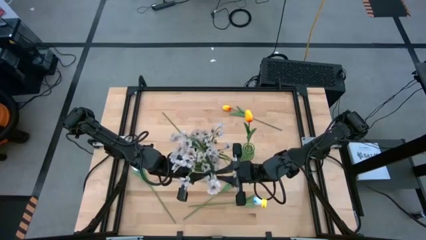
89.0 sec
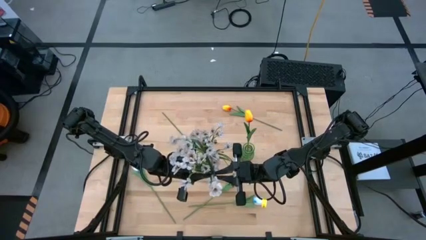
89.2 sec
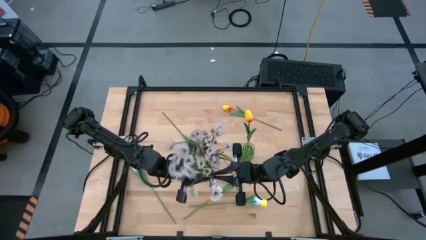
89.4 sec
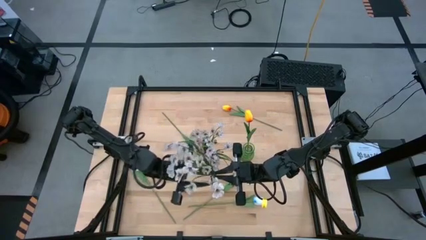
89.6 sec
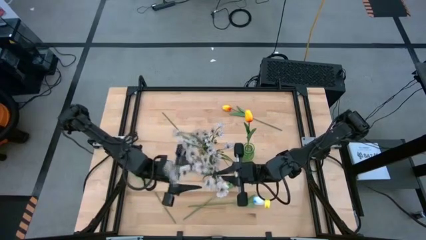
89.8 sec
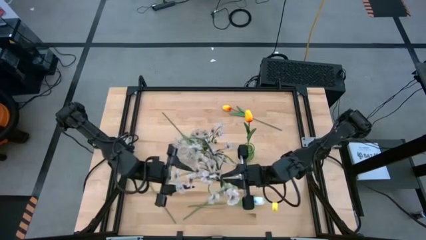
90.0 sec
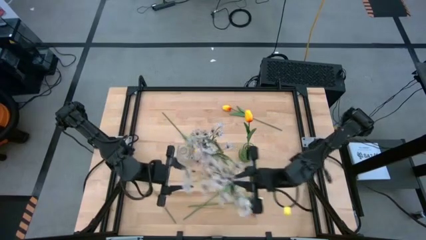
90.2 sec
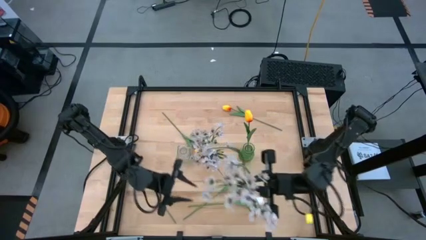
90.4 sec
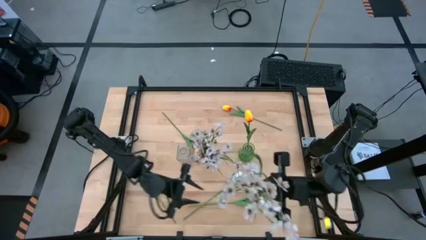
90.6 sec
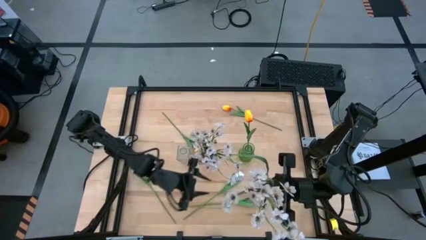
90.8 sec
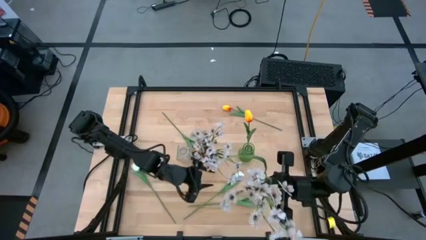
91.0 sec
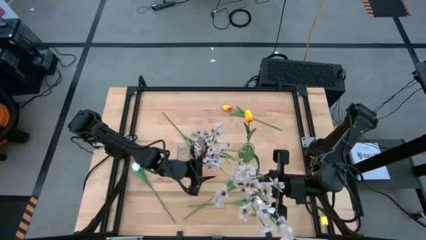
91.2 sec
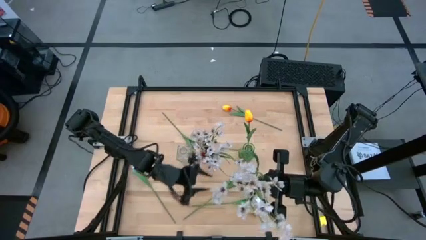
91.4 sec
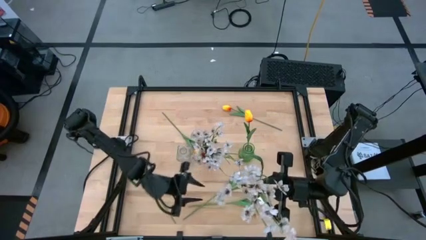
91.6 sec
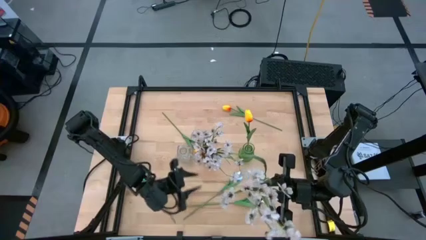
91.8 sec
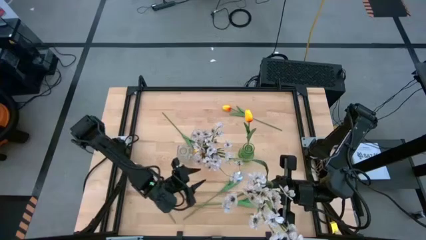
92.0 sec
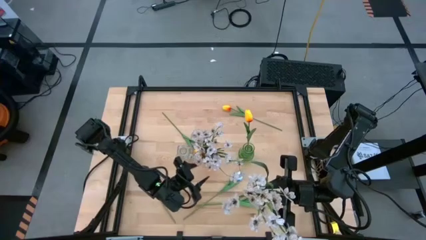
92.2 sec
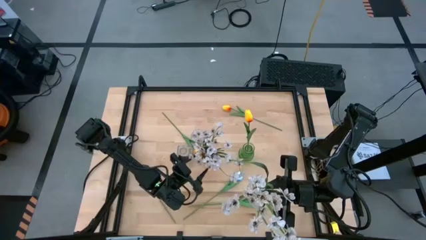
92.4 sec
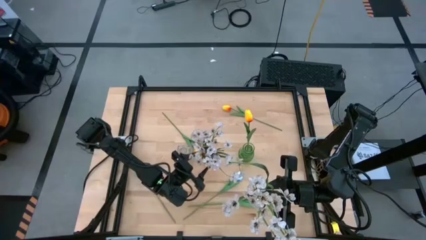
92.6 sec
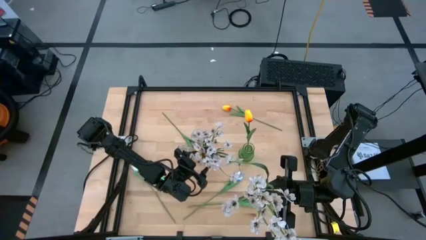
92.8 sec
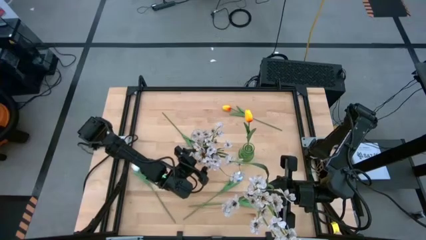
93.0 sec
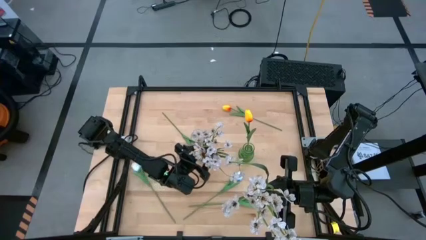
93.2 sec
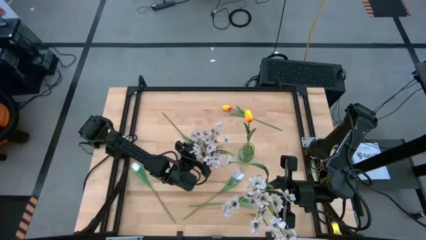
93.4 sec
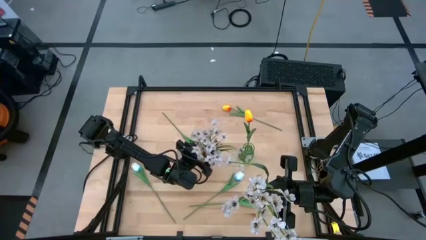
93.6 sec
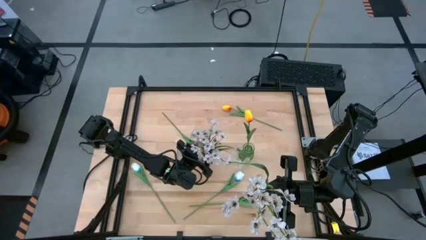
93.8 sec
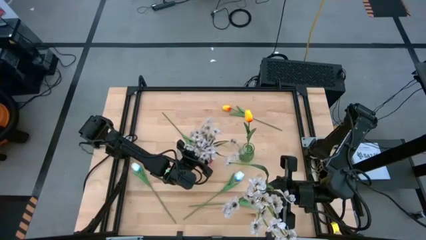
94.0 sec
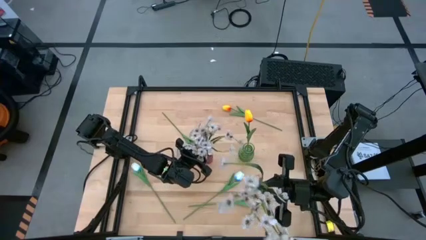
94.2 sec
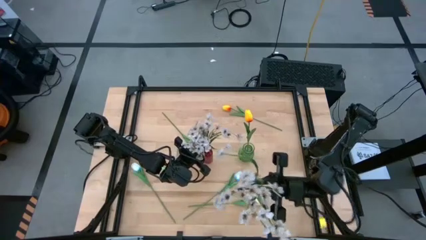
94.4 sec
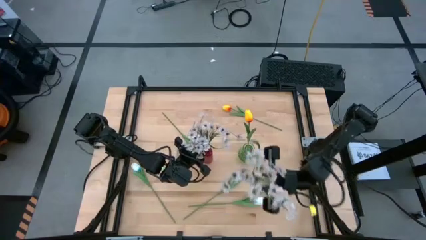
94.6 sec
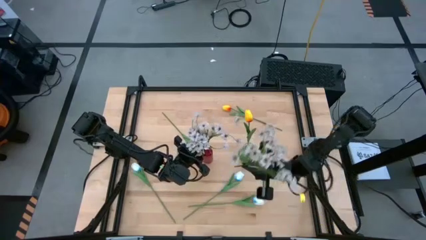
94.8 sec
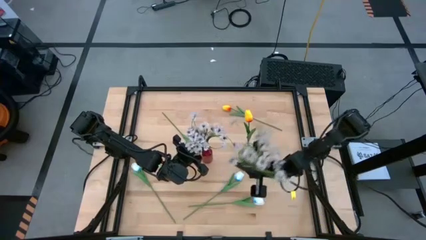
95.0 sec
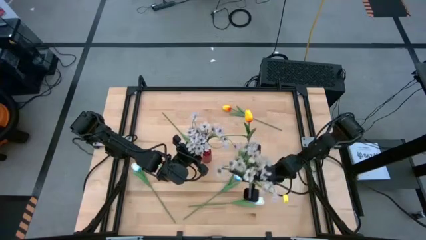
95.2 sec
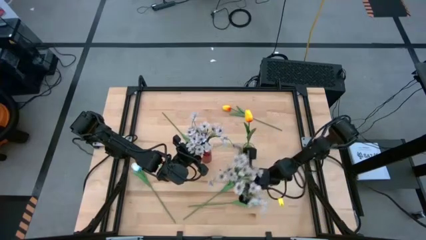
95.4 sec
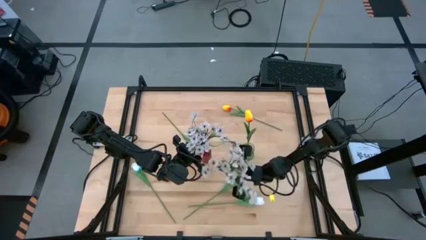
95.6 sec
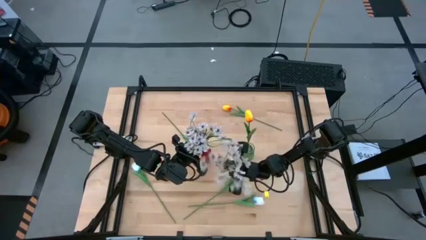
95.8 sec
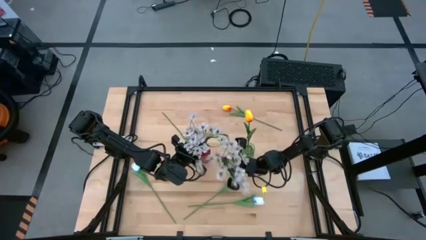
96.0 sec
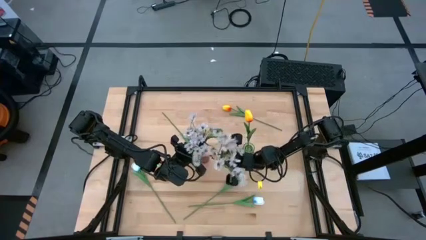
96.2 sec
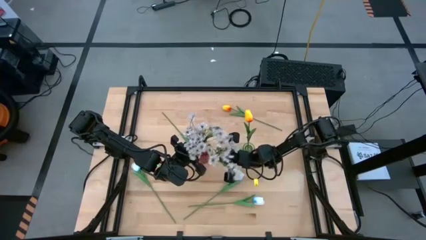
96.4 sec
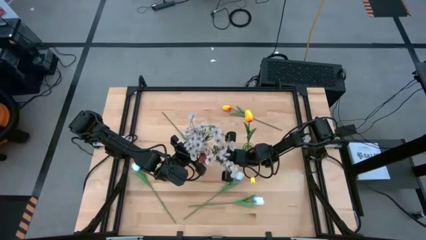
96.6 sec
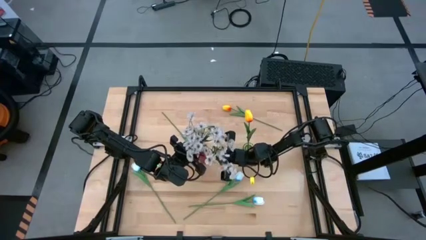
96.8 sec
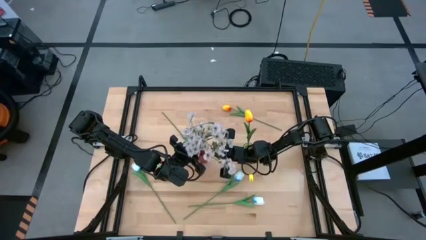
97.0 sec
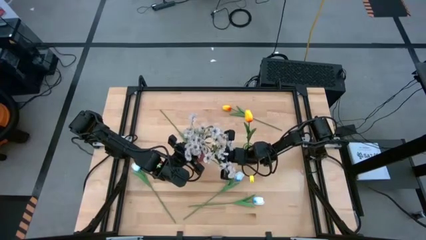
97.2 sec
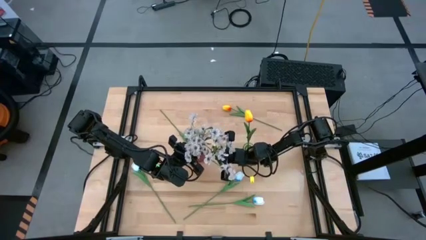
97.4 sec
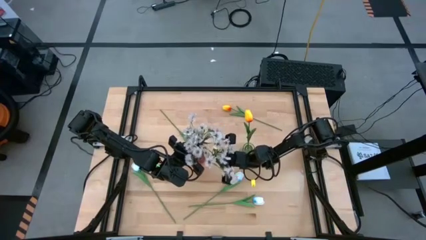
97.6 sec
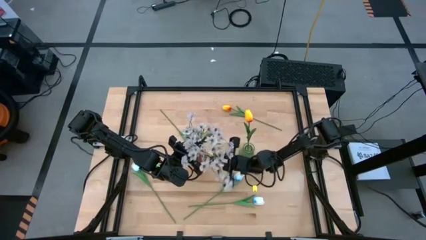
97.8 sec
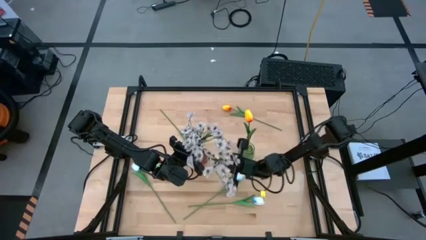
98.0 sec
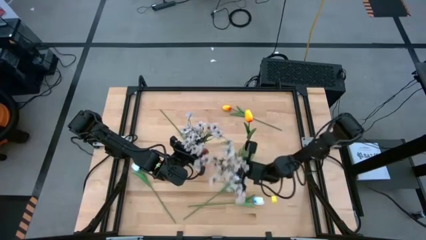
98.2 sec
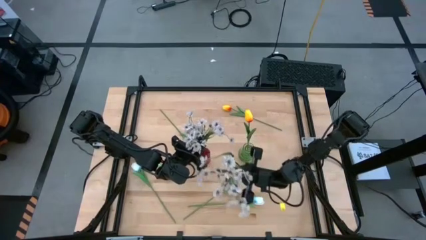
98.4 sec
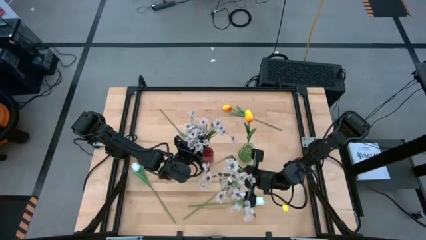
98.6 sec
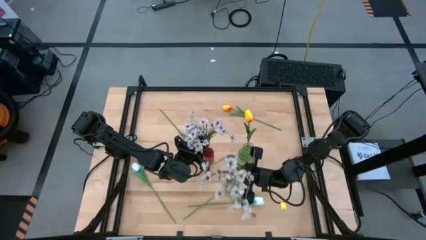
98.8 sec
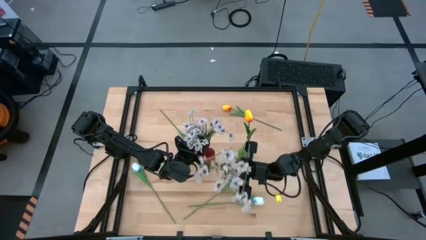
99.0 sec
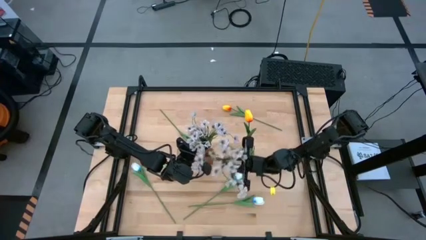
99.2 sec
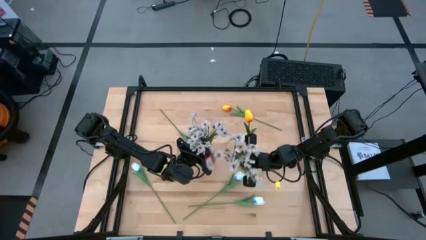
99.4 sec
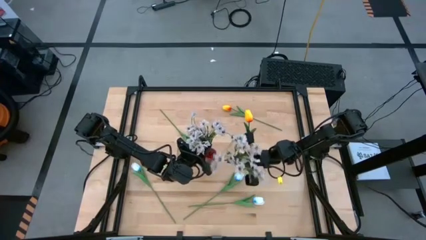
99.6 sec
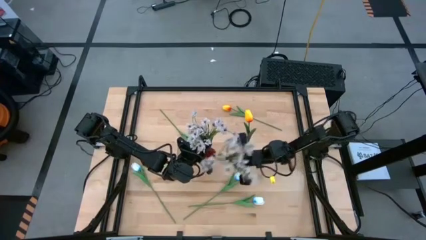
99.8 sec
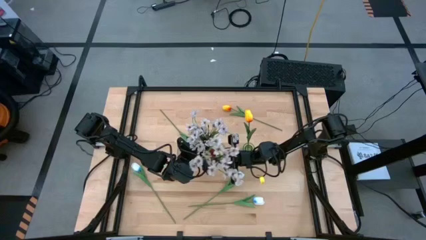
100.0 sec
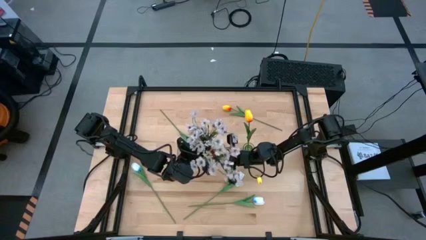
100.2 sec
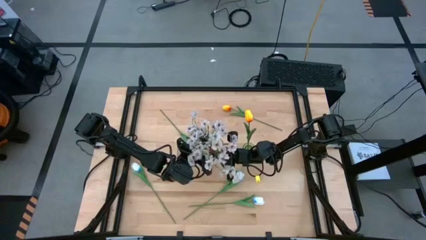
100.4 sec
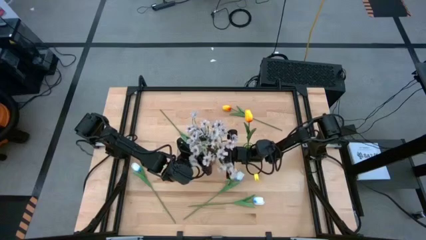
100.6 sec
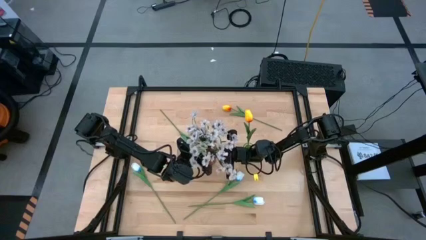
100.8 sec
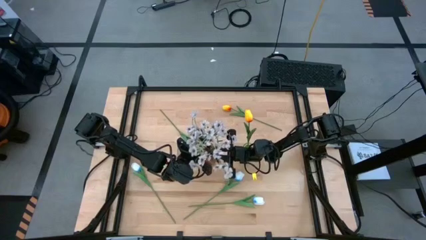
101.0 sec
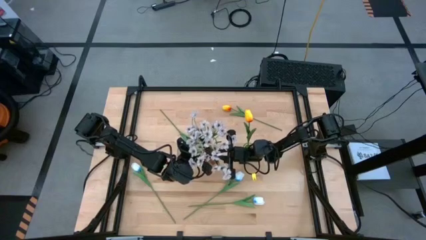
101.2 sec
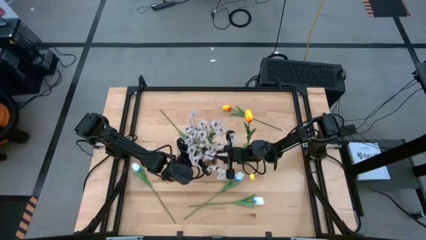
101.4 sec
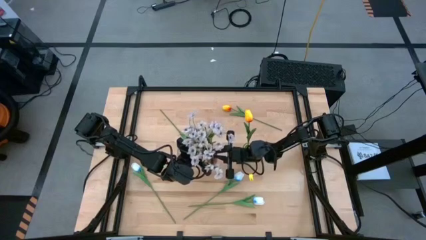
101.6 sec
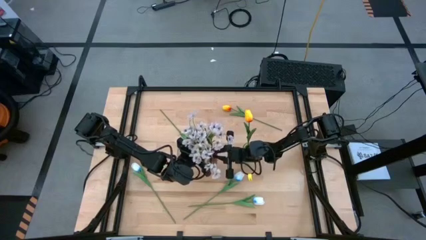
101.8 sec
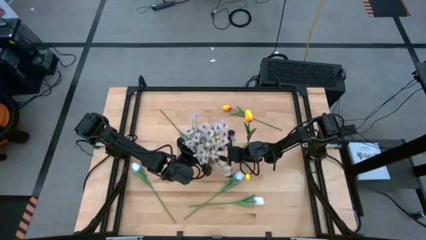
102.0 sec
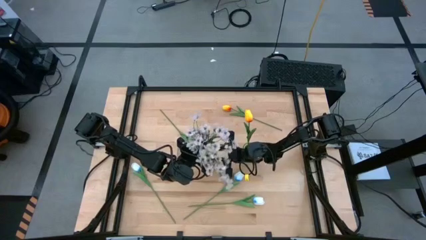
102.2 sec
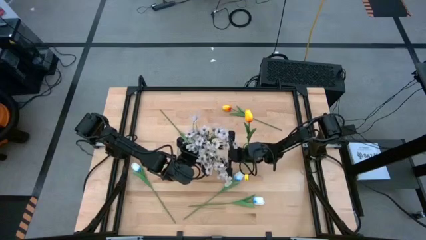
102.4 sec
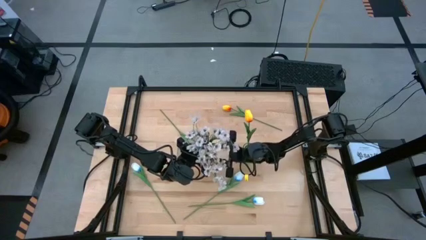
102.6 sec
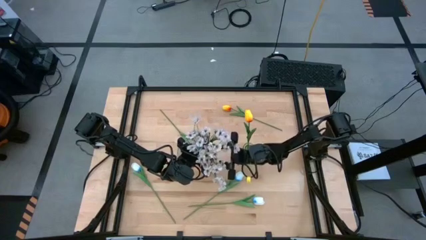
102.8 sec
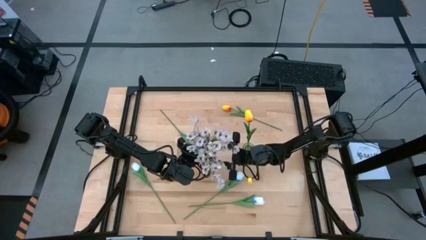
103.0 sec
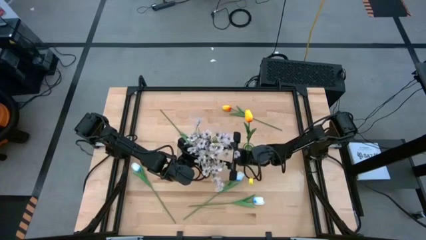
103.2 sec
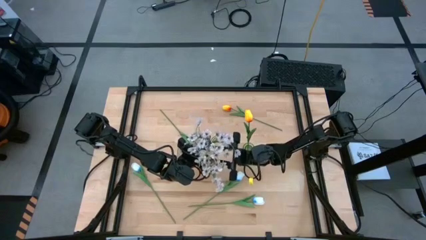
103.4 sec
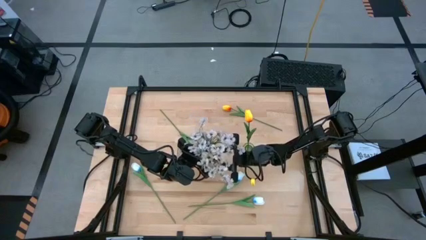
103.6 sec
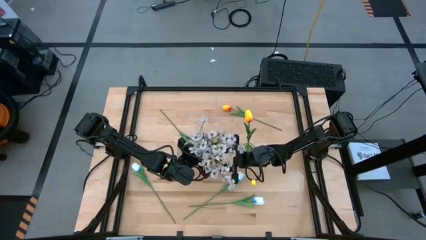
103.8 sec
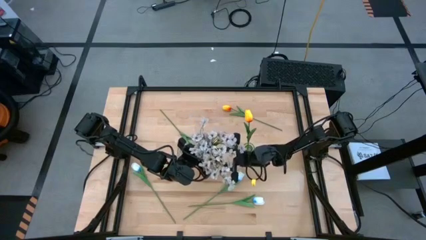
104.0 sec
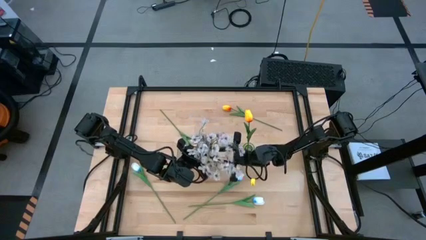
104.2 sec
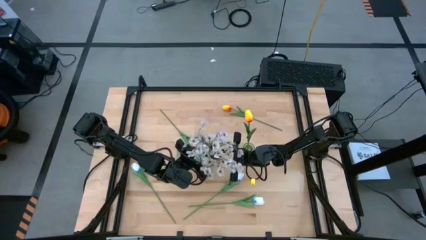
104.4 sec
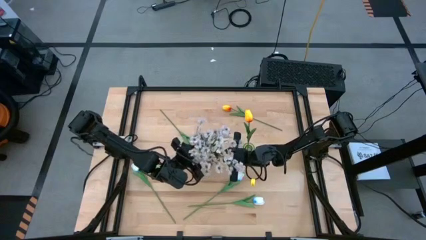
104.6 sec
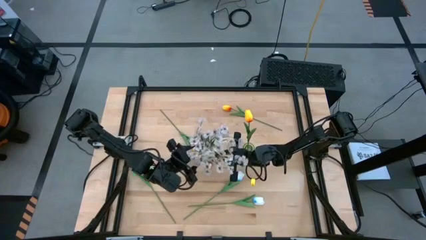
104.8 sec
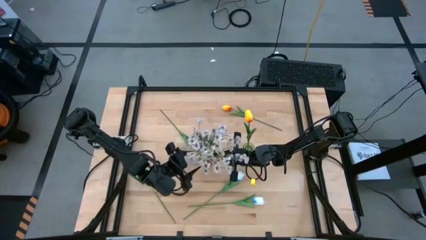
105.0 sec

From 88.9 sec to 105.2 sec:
Task: Sort flowers into vase by color
Put the white flowers into the red vase

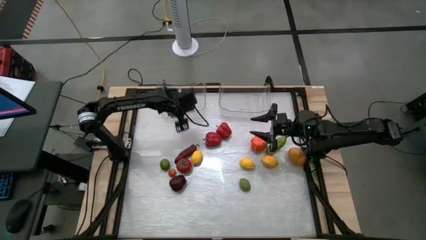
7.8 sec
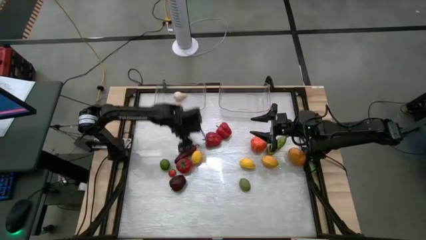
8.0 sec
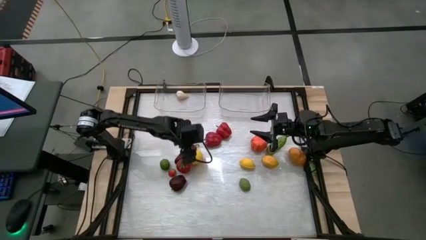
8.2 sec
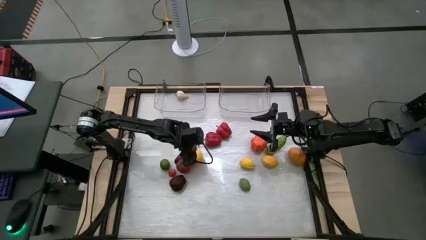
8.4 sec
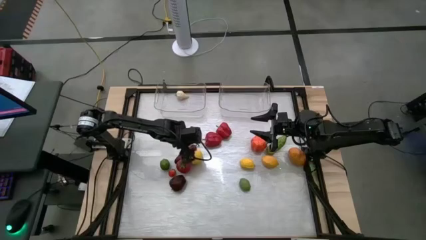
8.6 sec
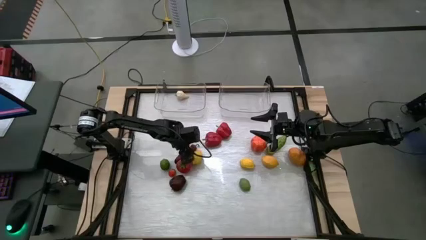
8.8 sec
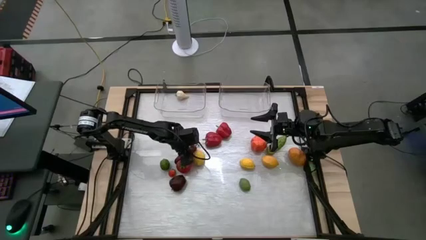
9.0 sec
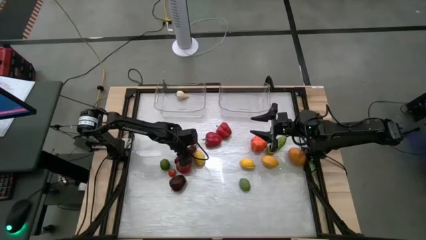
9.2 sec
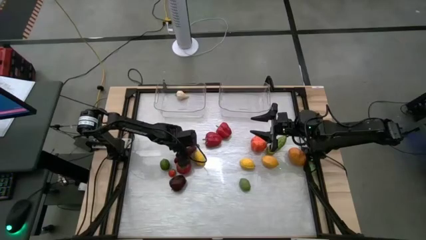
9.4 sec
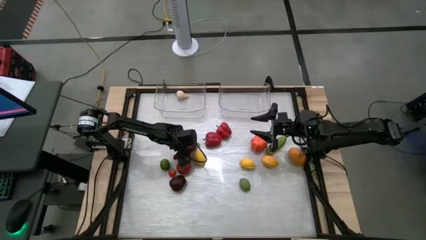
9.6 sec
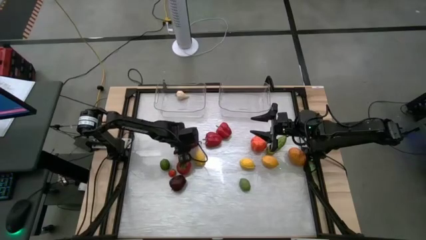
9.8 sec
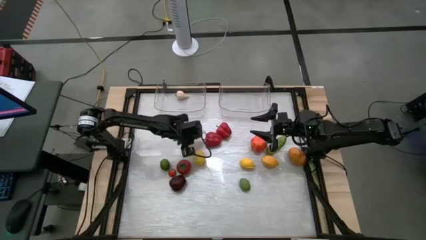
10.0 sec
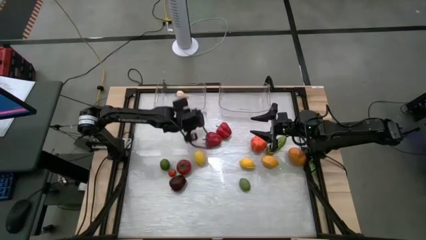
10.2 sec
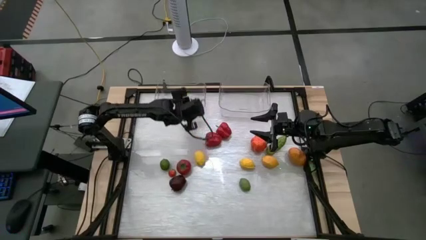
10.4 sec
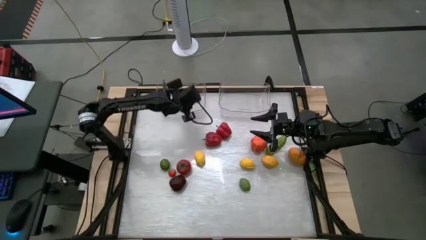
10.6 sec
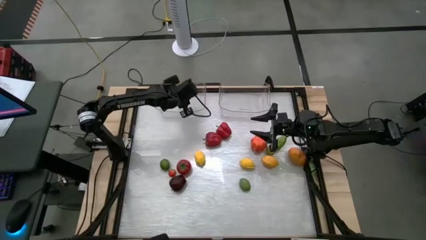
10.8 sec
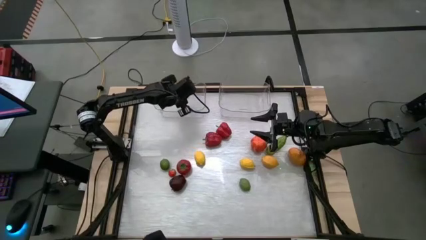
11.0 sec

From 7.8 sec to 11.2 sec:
Task: Sort produce into baskets
Put the pepper in the container
